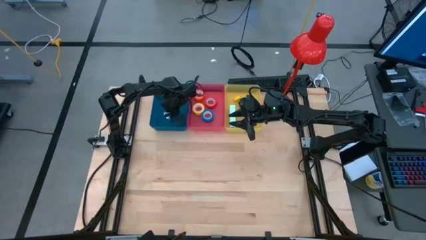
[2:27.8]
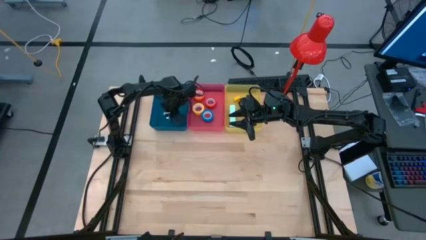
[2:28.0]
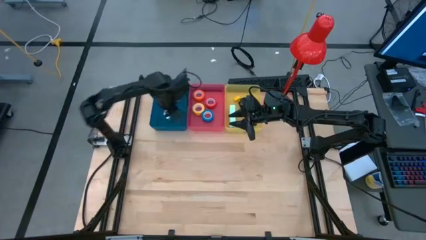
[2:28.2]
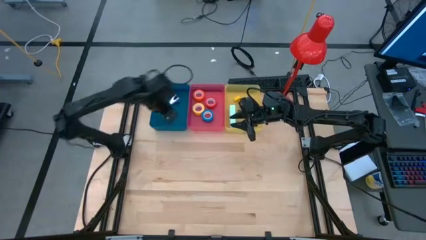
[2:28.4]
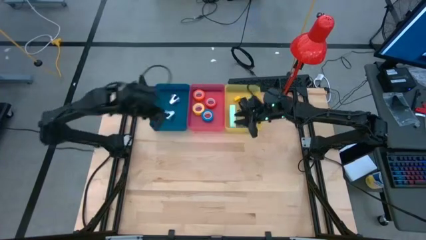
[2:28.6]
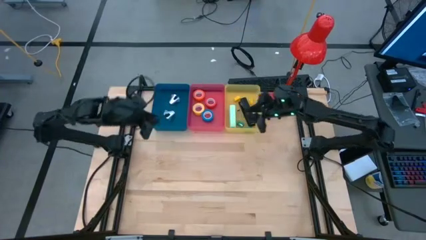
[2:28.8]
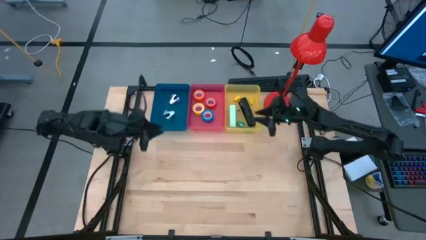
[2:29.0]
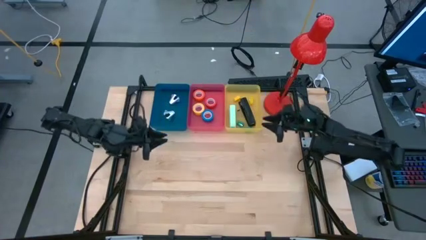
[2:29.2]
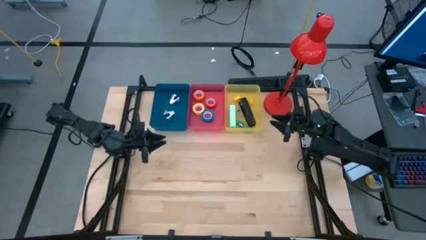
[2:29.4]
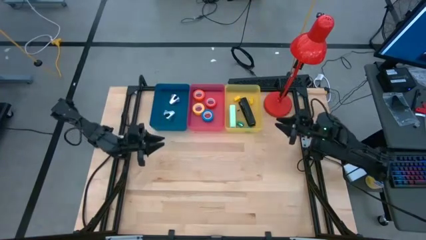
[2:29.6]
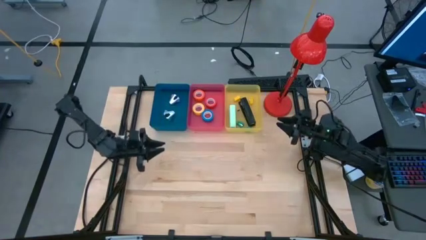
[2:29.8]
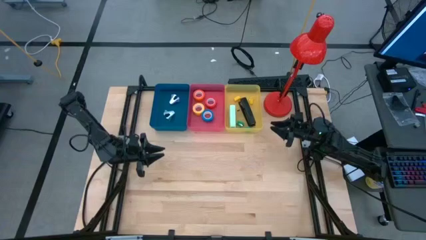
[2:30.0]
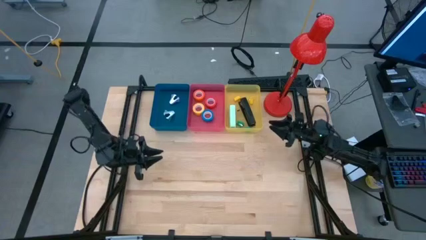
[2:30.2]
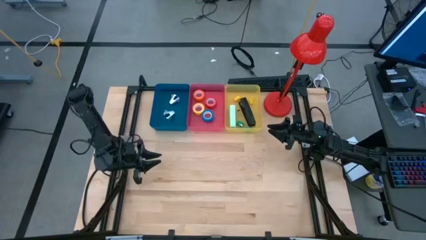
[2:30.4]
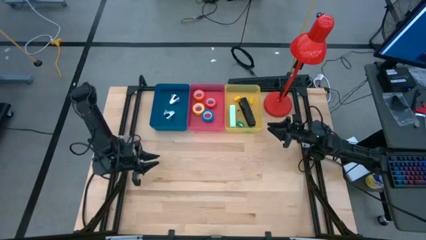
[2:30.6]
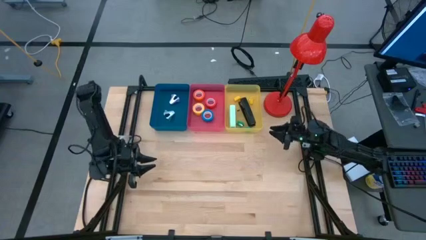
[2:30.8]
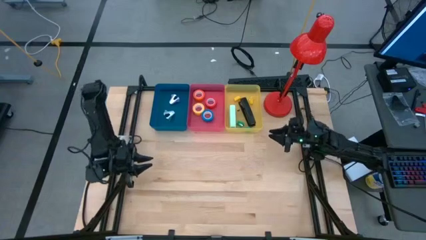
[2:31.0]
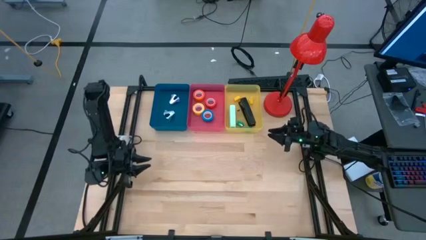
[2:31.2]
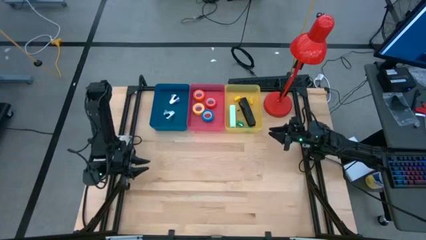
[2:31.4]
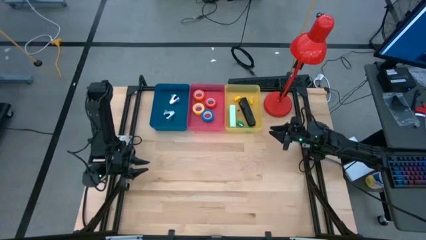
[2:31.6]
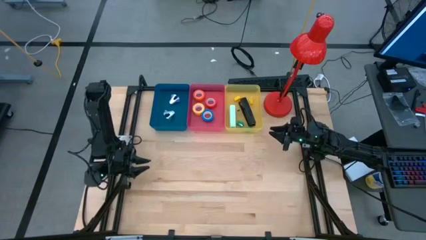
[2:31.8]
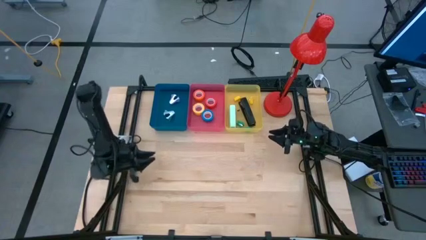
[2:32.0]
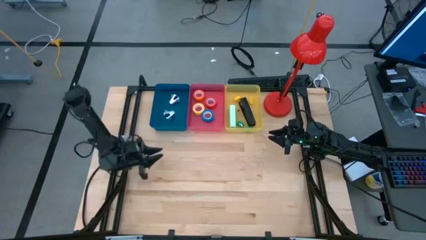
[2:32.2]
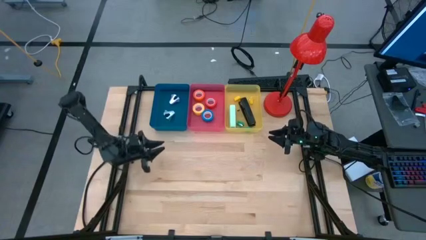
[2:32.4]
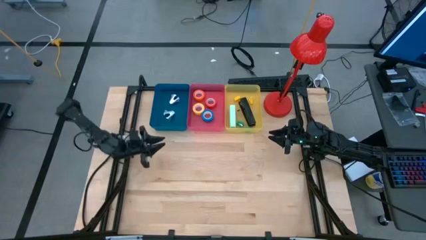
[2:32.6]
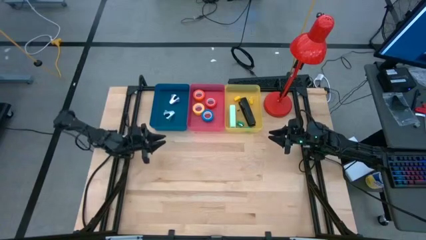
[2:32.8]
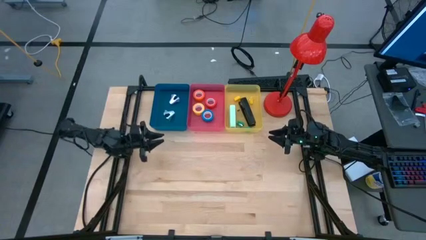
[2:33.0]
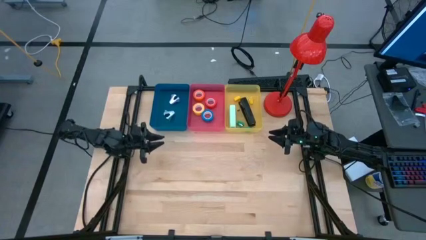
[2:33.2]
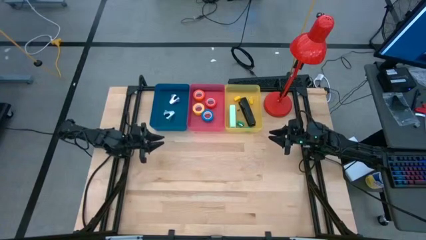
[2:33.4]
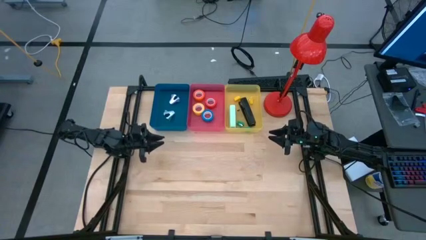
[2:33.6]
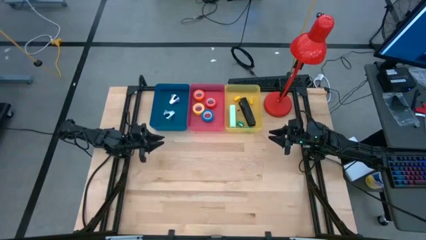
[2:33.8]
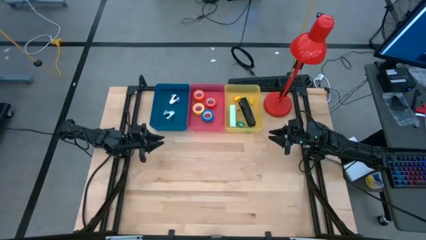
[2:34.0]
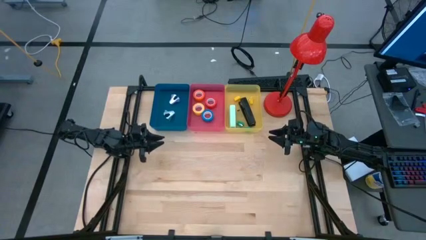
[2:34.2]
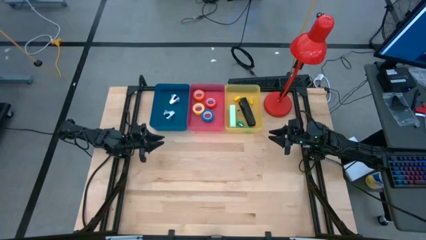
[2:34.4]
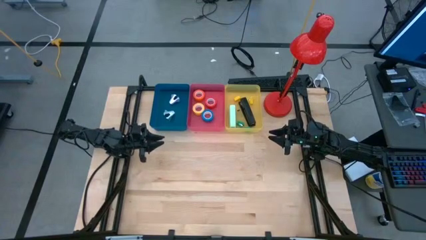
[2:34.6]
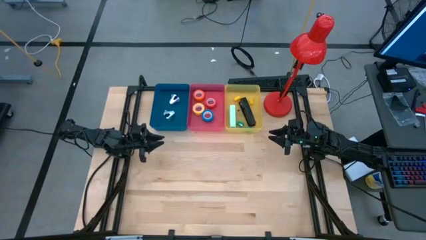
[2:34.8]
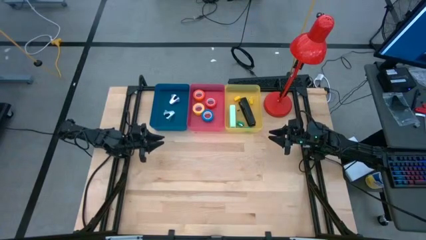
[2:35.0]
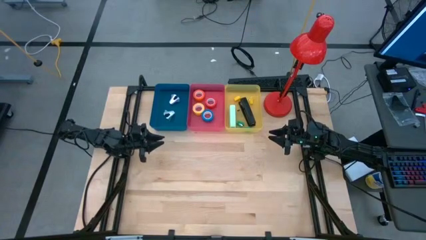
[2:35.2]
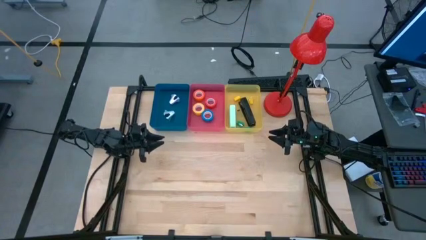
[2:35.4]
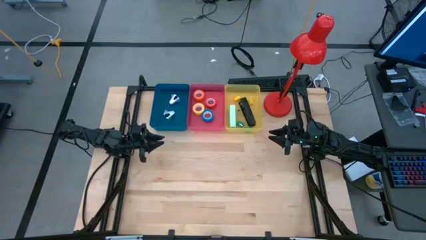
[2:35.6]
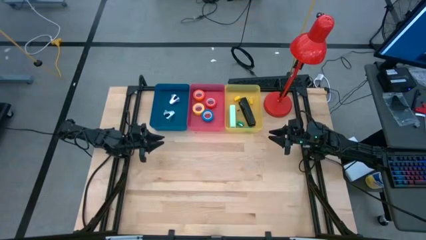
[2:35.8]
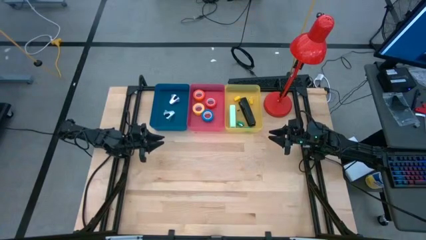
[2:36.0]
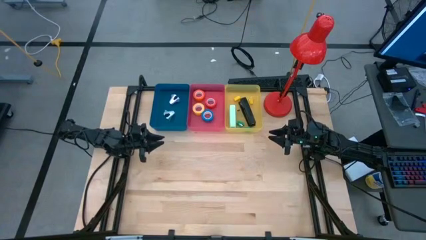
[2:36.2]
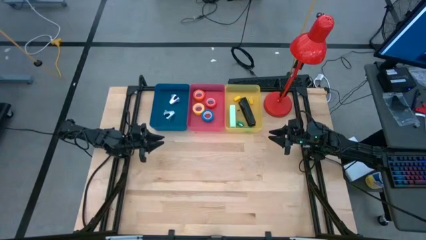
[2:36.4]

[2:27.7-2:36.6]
Task: Pick and place Stapler, Stapler remover, tape
Return to Home Position
